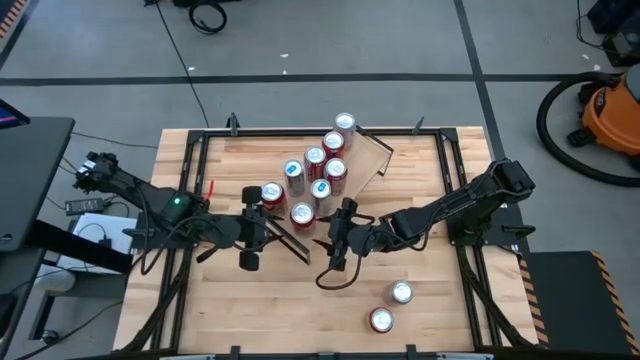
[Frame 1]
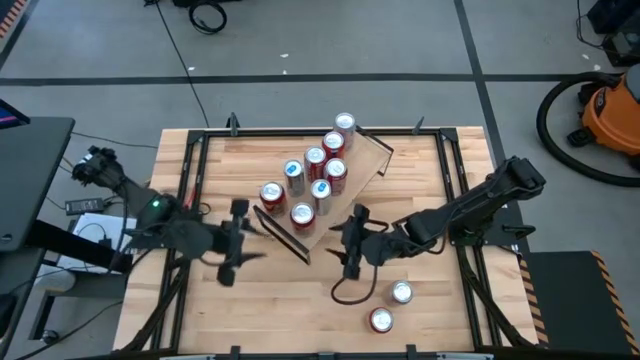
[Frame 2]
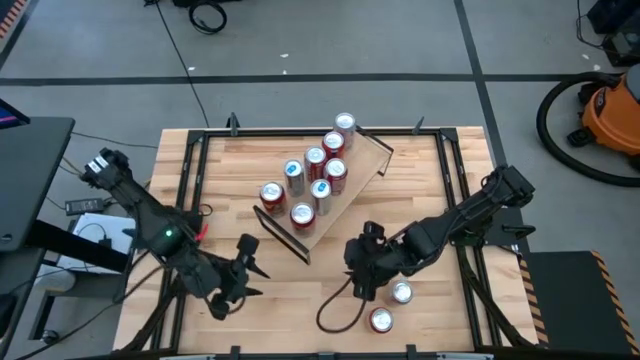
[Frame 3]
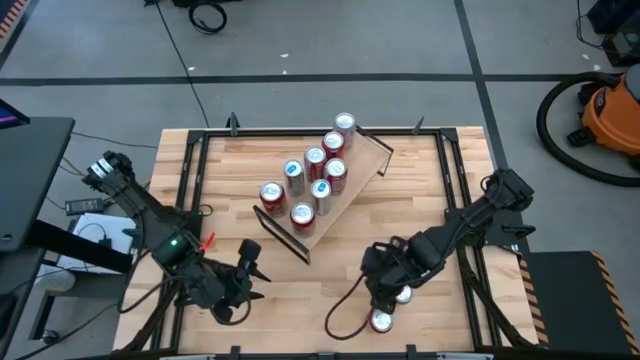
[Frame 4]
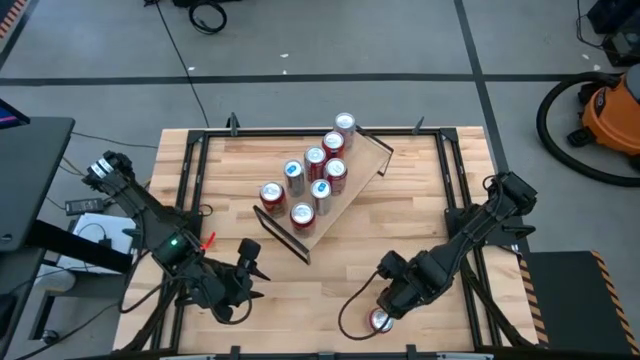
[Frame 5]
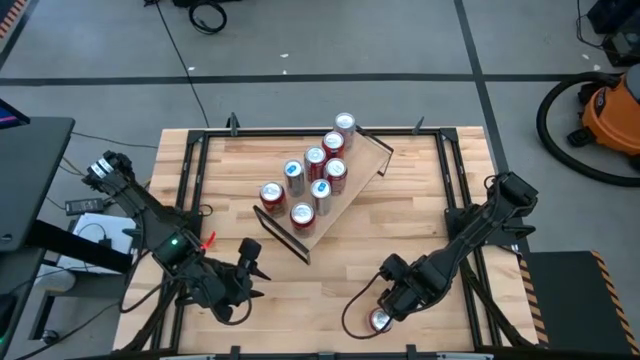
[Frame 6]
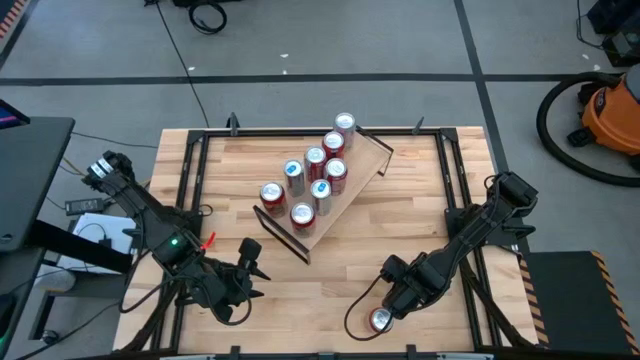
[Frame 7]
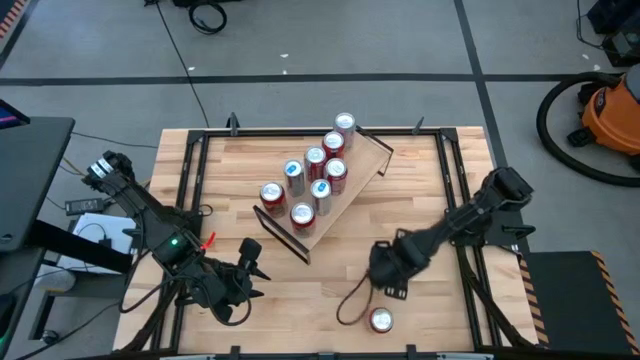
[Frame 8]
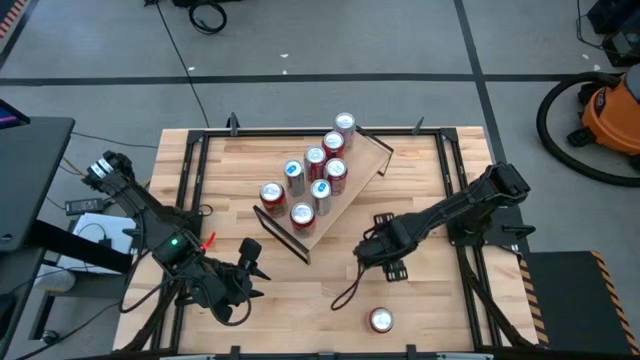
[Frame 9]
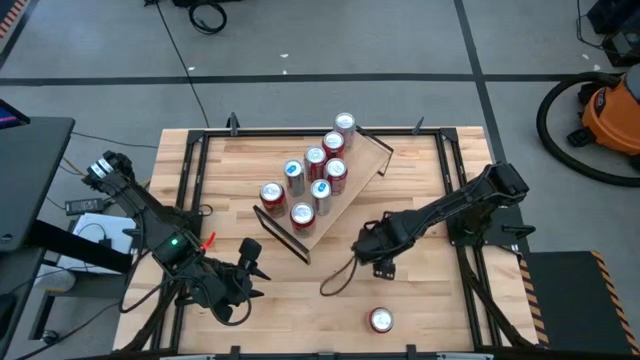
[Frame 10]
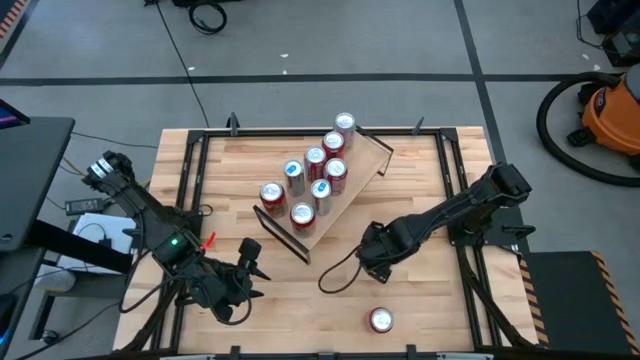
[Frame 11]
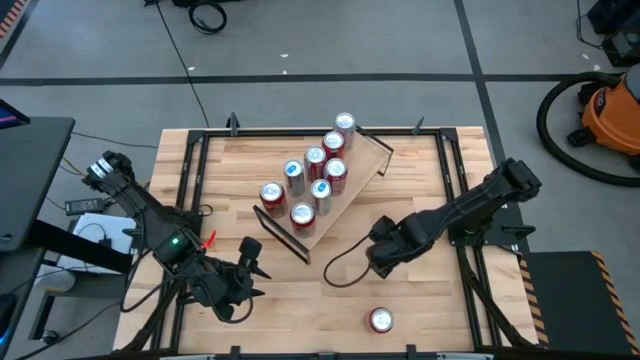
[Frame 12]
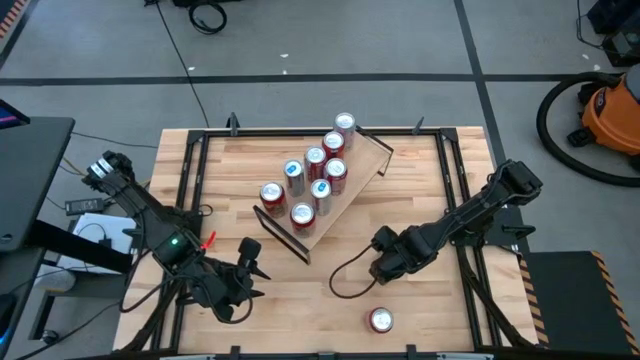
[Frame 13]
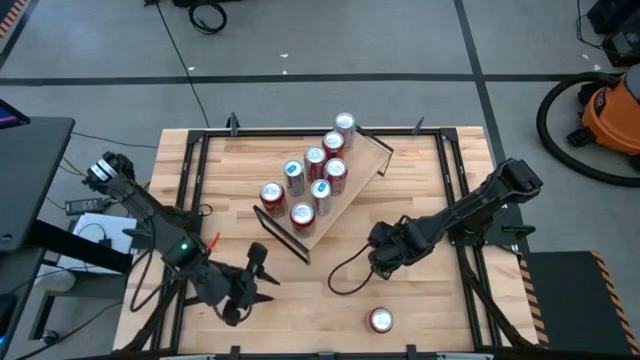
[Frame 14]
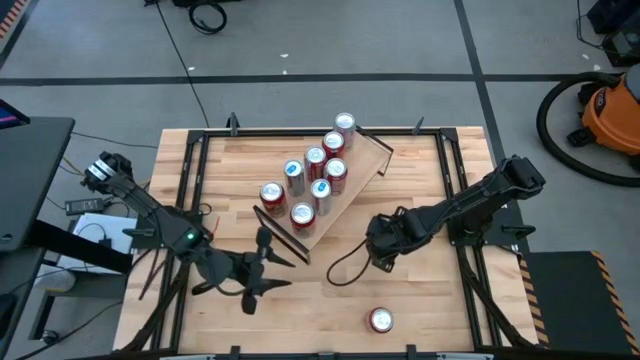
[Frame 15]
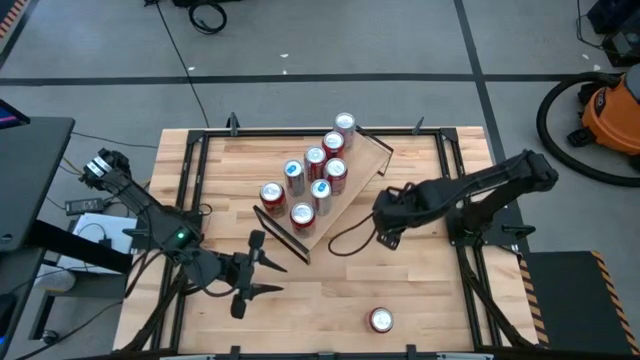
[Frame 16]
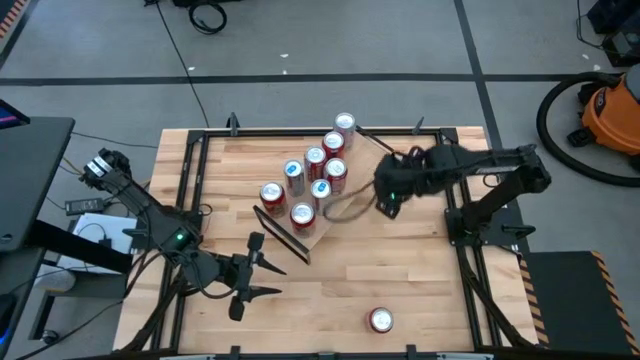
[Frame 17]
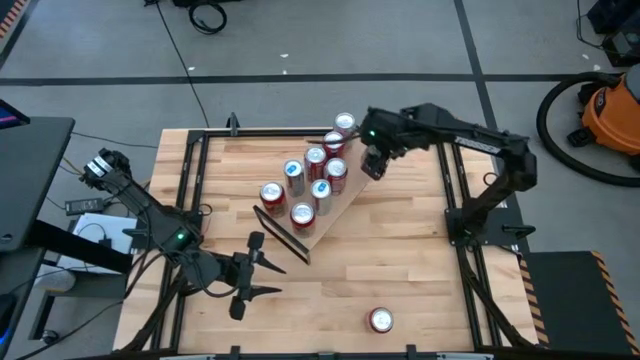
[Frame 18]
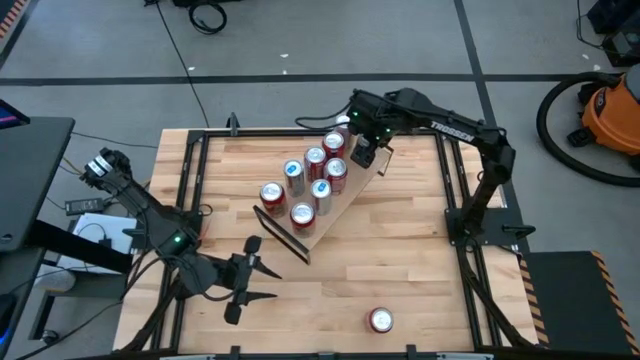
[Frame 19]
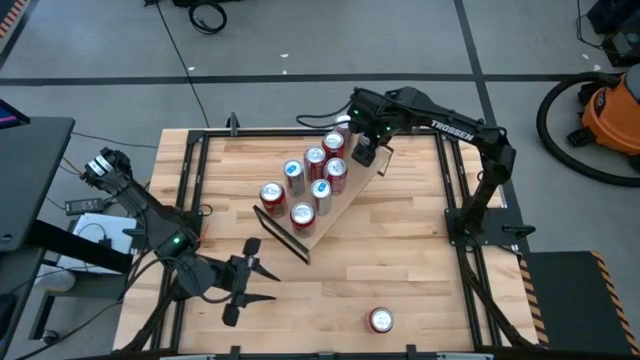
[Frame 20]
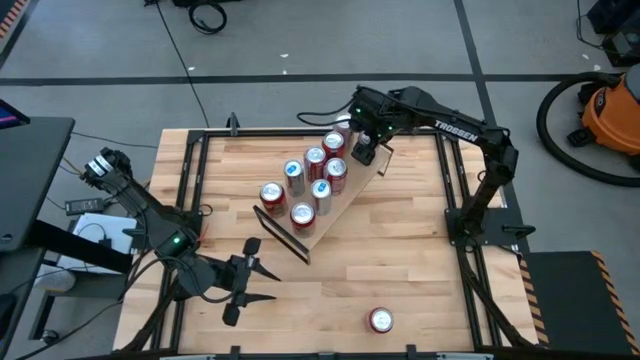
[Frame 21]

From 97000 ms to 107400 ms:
Task: Place canned beverage on shelf
Put the red-silver soda can on the shelf aligned with the other red-silver soda can

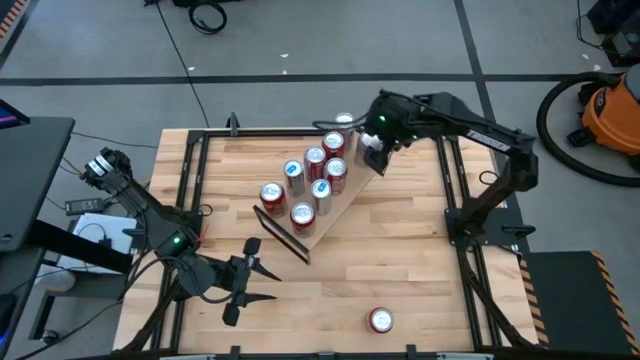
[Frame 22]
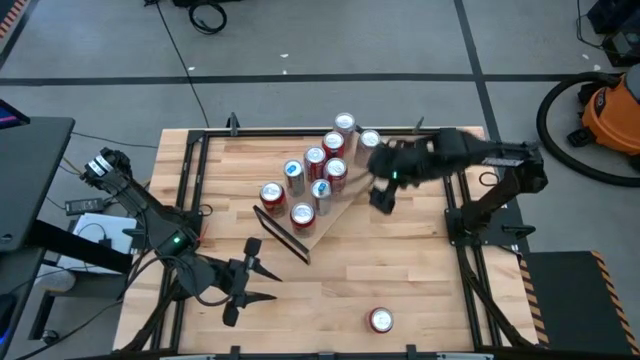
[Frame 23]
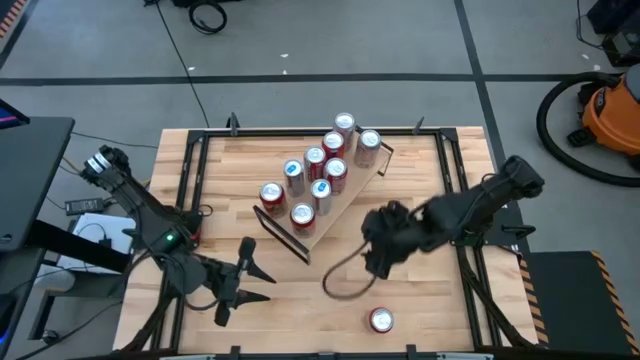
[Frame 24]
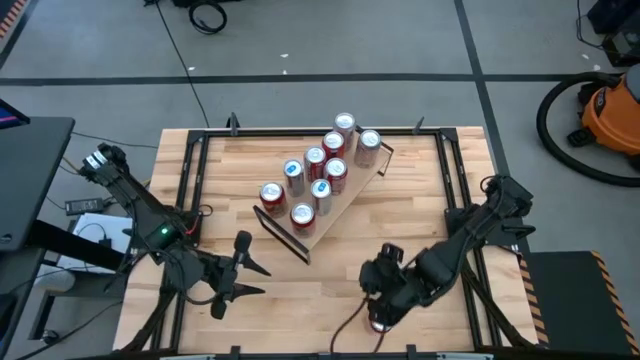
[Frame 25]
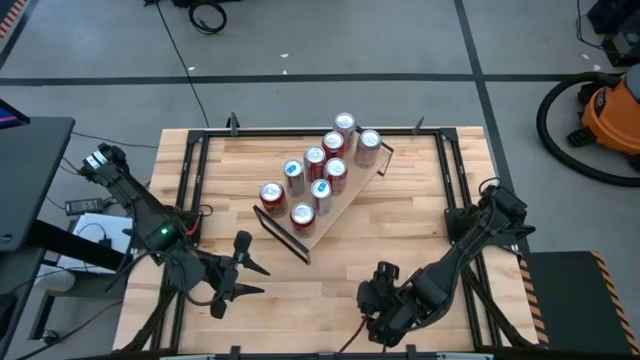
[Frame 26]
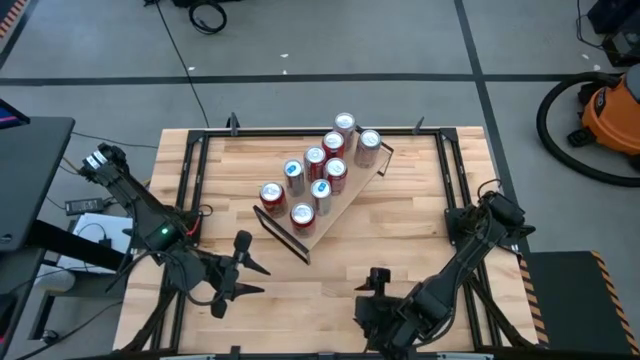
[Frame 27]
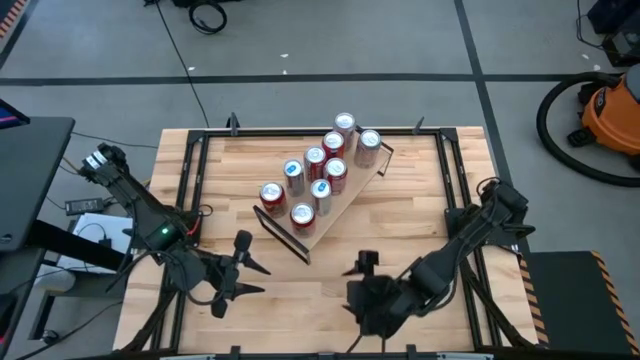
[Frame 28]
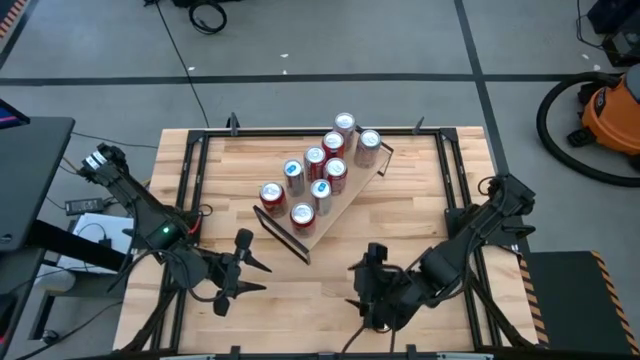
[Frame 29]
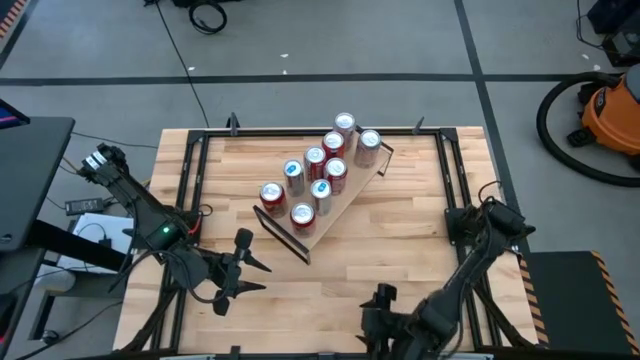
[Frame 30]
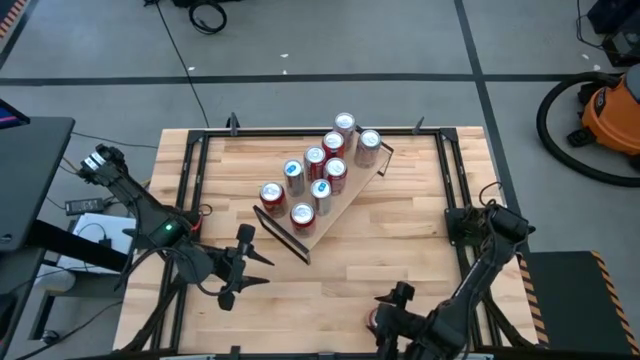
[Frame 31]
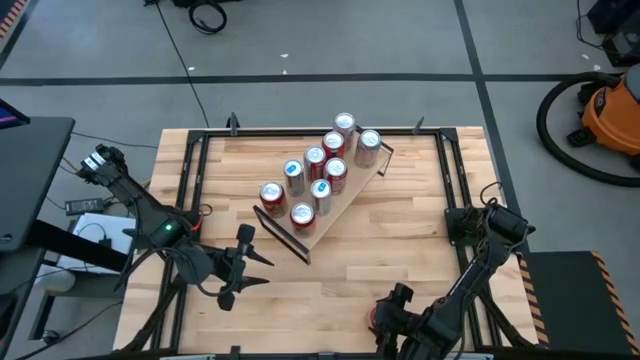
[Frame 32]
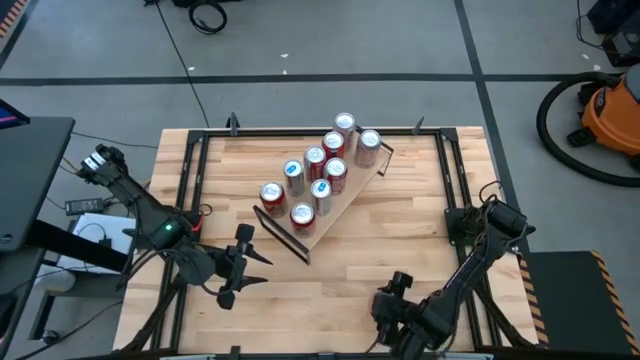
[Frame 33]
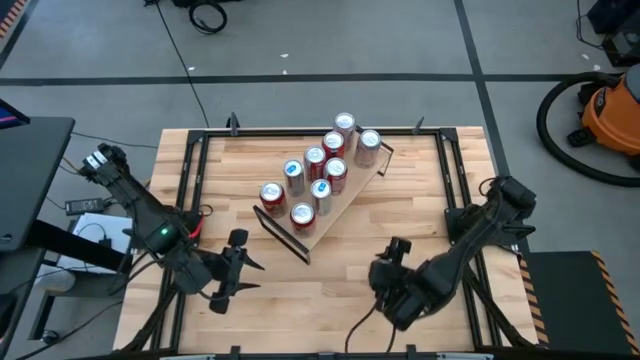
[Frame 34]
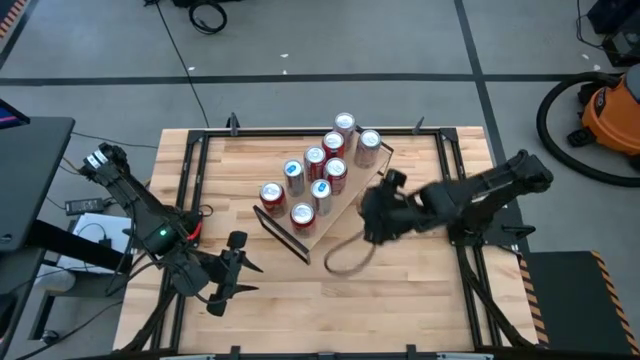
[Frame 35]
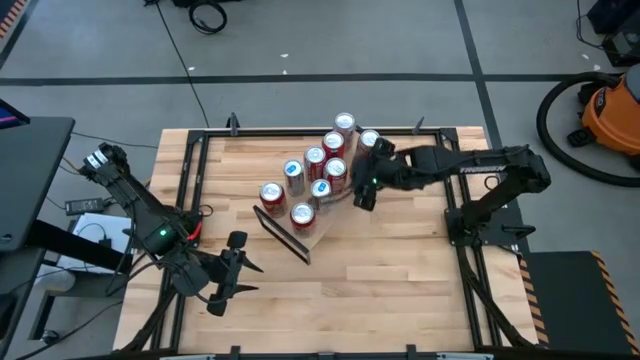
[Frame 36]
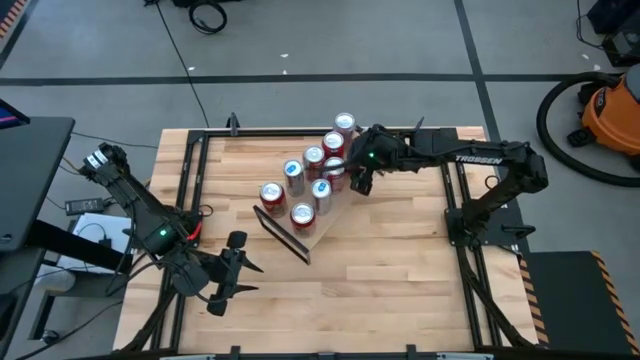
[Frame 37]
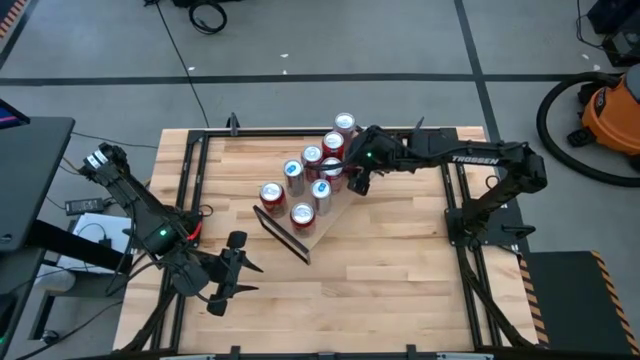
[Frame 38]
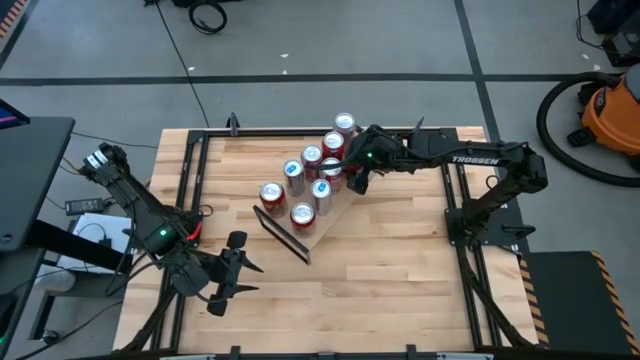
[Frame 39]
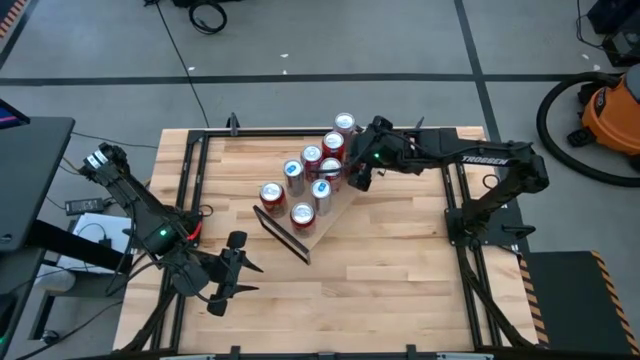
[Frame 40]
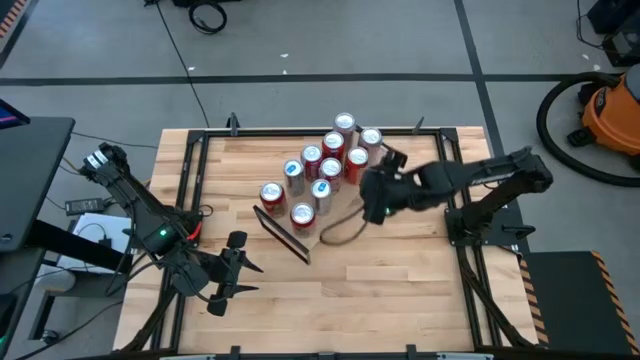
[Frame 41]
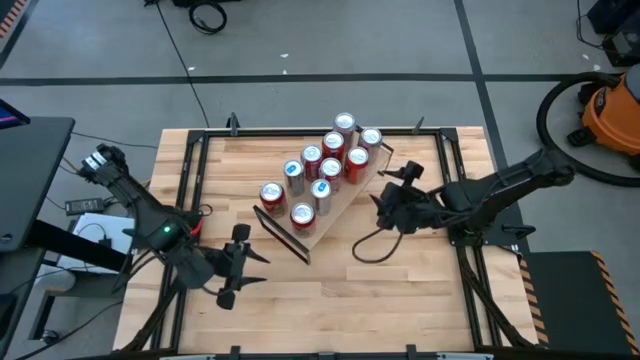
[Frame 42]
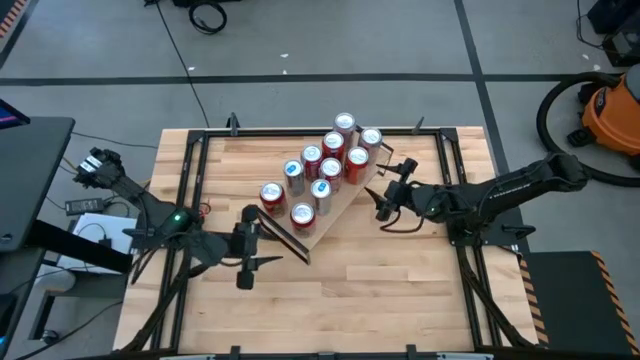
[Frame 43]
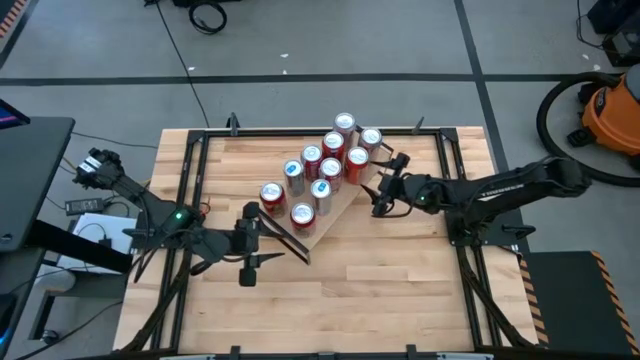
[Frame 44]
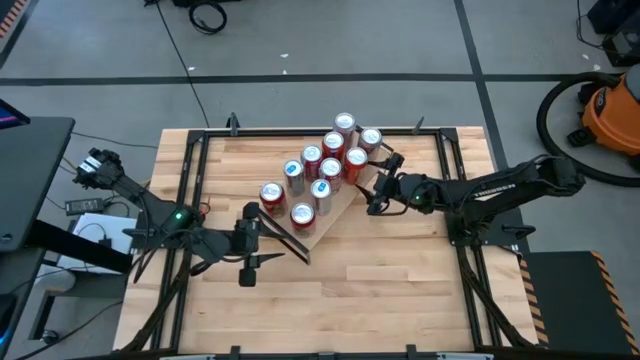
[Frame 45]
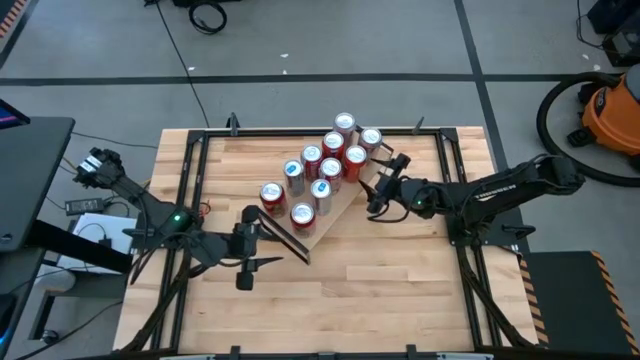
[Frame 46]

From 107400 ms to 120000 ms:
Put the red soda can on the shelf aligned with the other red soda can
